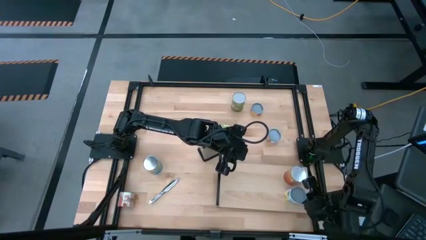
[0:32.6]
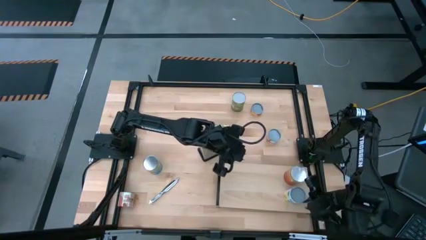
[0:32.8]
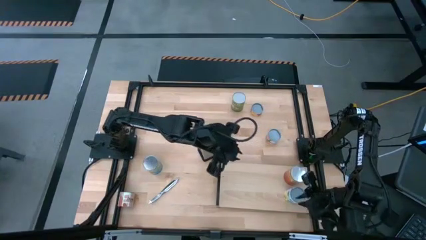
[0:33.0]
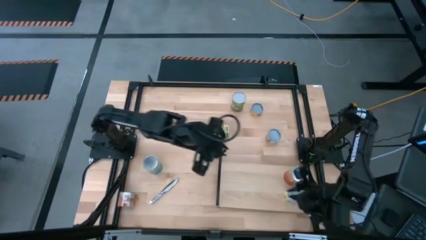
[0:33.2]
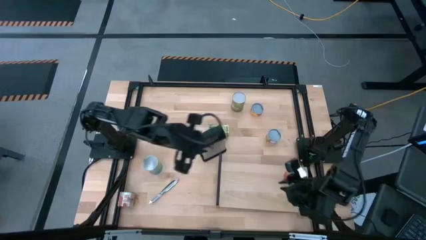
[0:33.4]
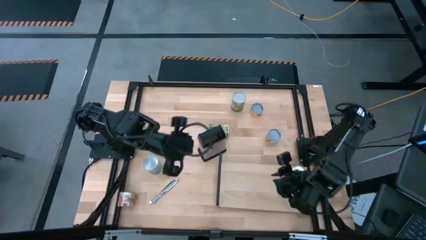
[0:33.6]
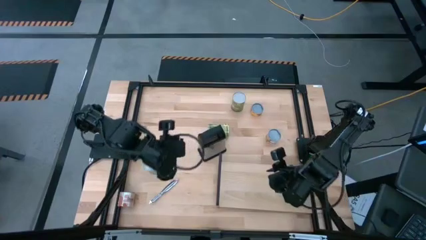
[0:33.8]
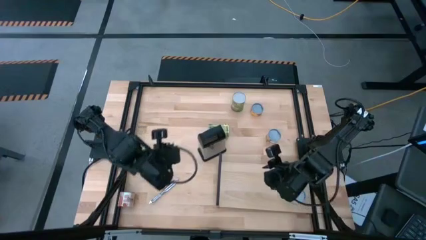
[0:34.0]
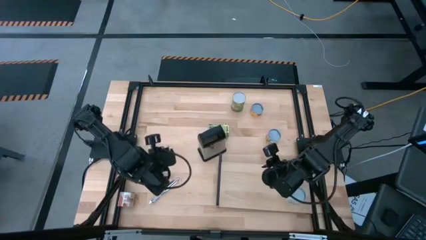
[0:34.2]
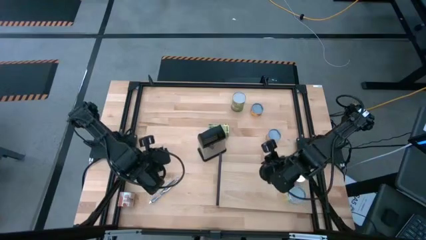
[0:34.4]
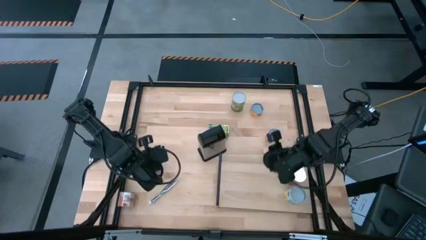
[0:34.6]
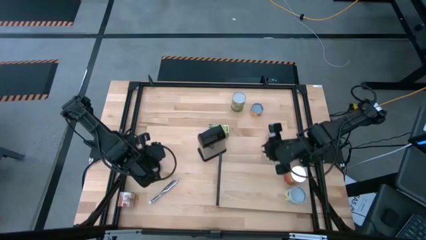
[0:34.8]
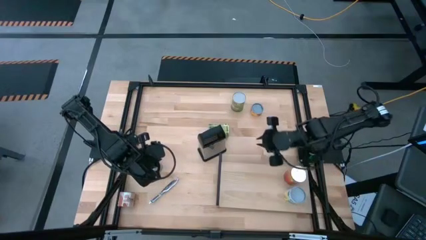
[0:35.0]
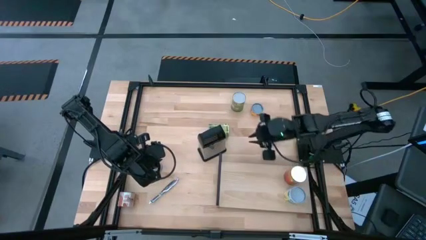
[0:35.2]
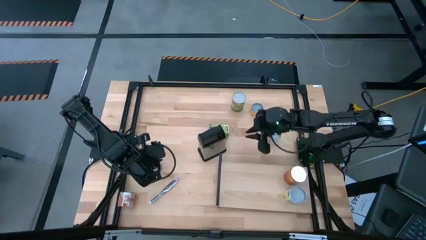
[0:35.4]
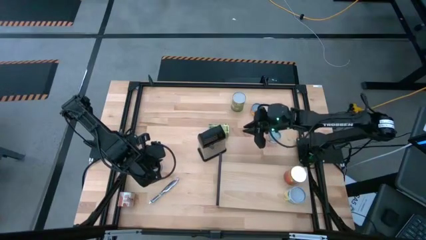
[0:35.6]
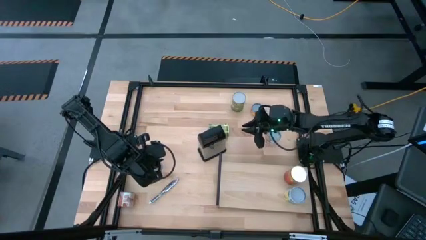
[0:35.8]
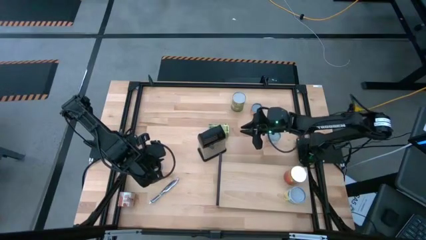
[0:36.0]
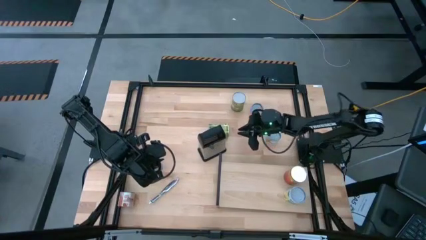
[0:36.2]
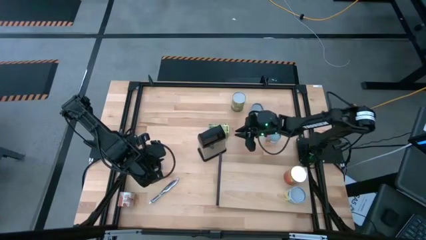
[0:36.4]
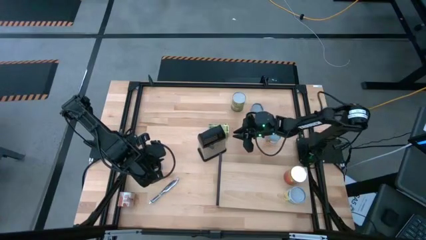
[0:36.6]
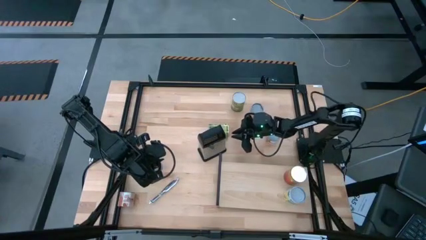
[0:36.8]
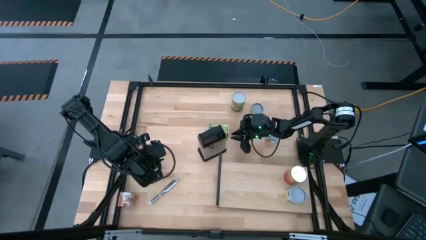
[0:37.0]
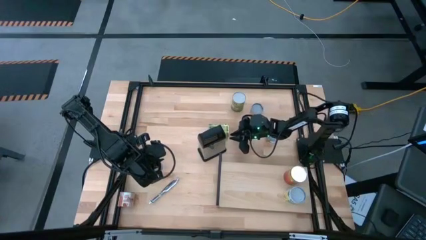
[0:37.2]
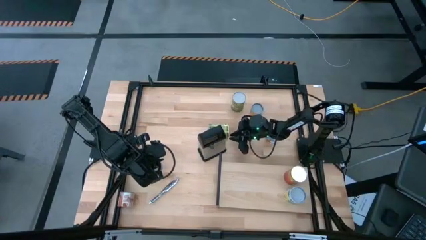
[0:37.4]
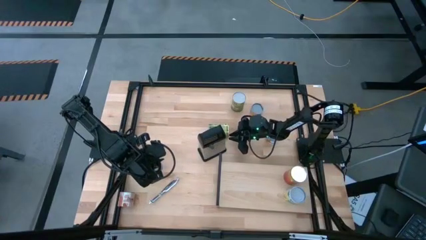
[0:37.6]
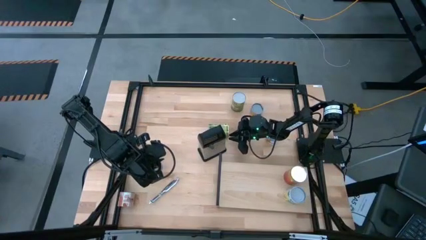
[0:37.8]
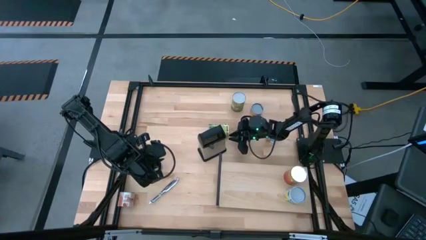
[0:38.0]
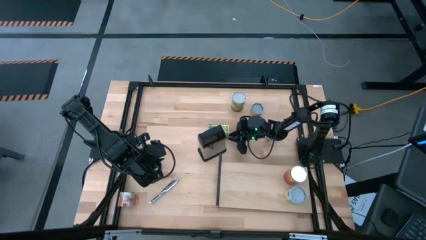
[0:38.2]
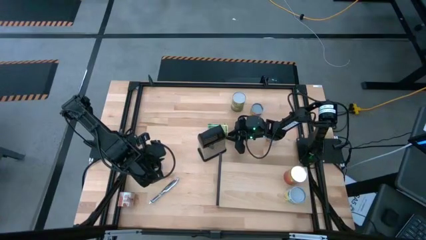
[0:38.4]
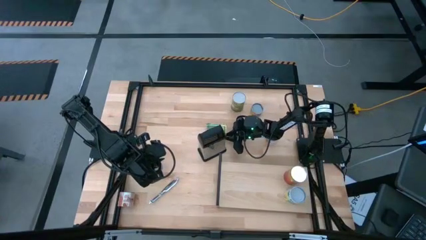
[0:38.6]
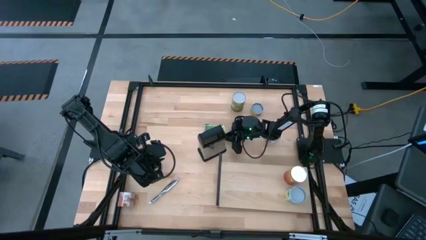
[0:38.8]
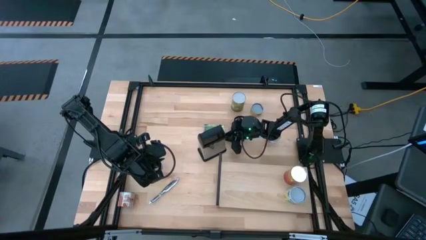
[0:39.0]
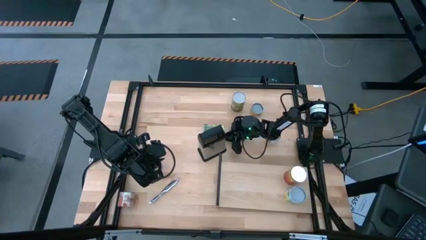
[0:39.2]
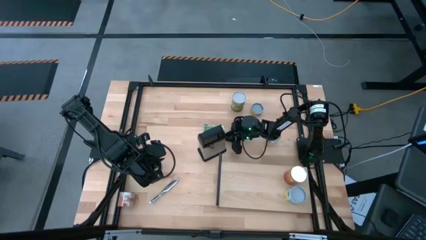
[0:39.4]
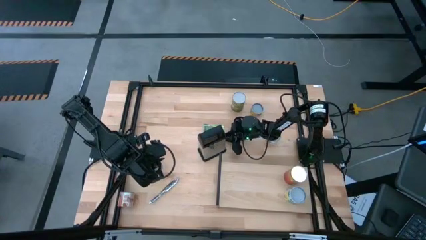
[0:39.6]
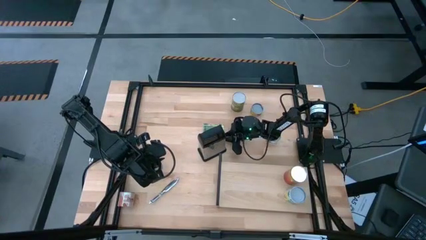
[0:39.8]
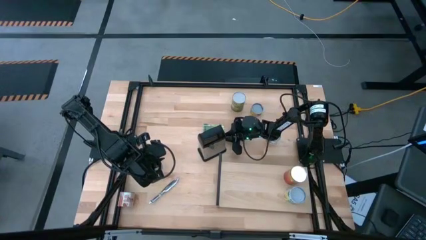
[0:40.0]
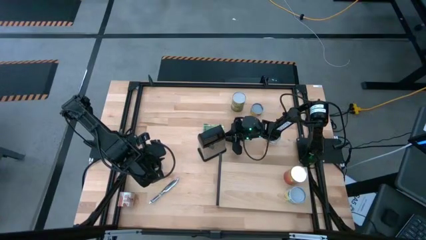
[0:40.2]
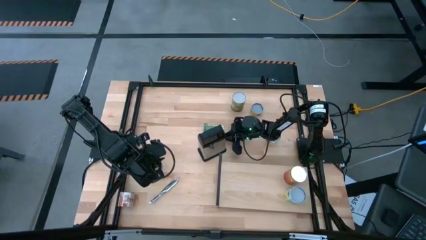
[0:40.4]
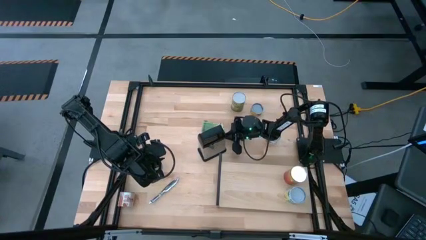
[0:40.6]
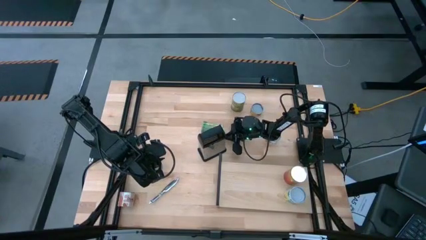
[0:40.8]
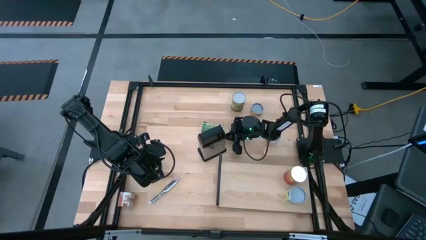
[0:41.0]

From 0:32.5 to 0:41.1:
Task: Pick and place cans onto a shelf
Put the large canned oranges on the shelf

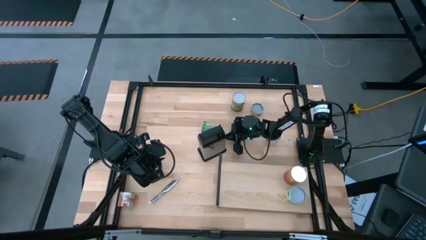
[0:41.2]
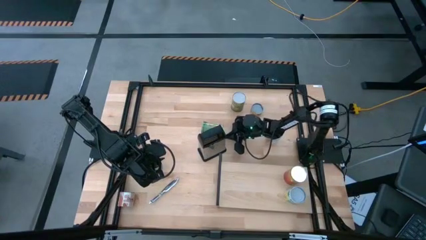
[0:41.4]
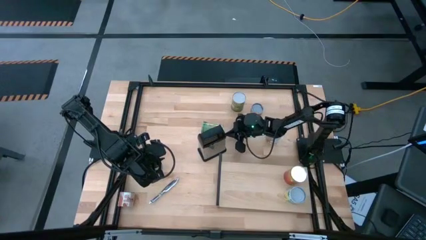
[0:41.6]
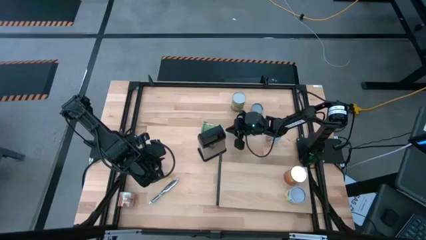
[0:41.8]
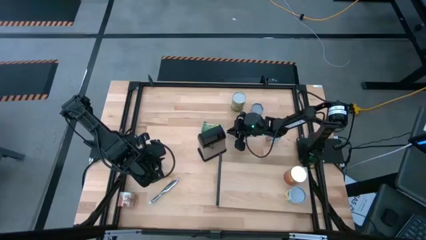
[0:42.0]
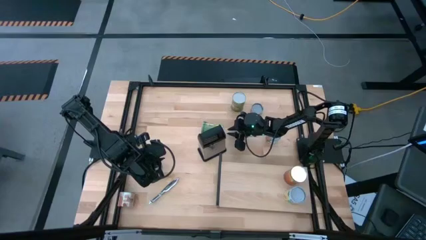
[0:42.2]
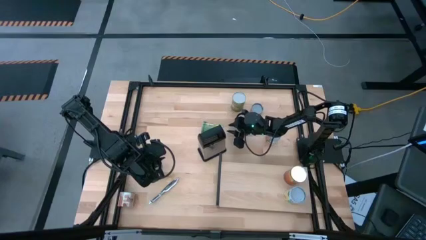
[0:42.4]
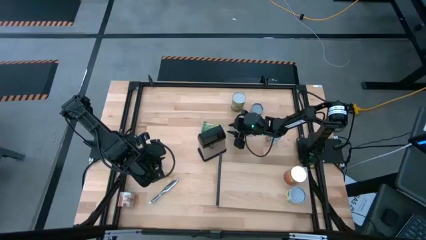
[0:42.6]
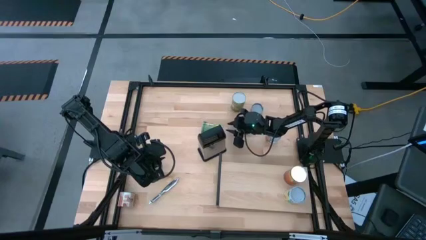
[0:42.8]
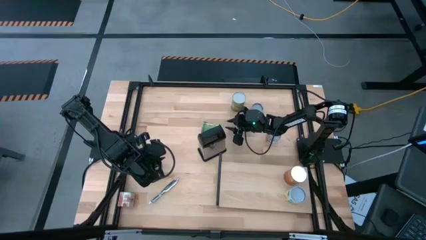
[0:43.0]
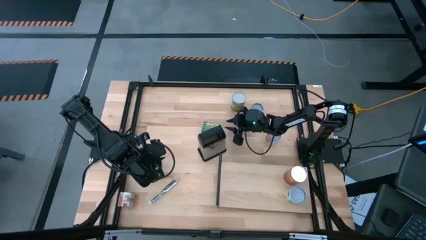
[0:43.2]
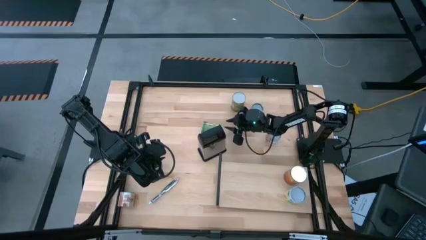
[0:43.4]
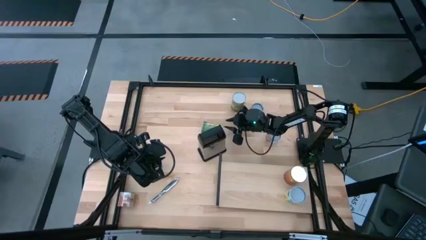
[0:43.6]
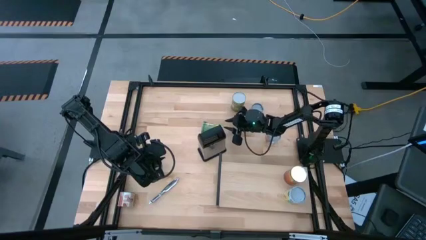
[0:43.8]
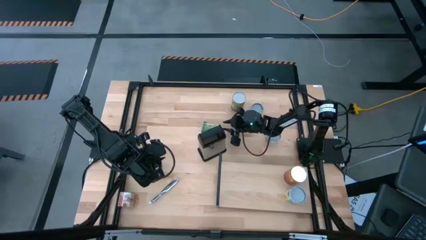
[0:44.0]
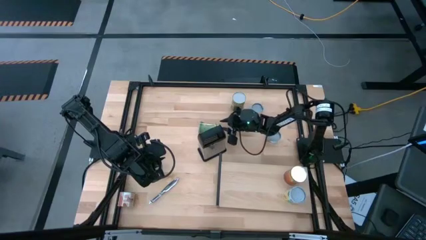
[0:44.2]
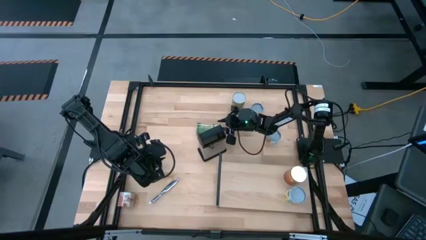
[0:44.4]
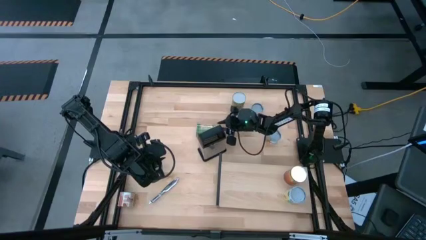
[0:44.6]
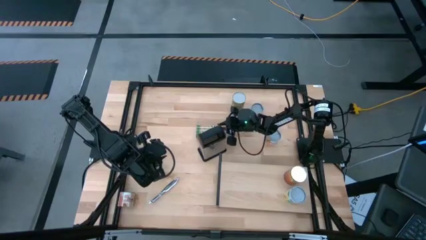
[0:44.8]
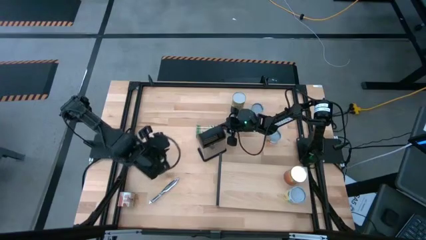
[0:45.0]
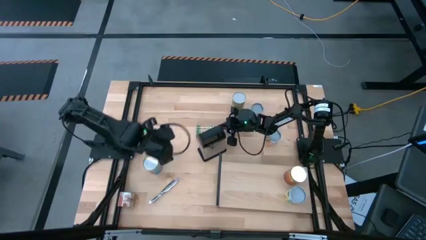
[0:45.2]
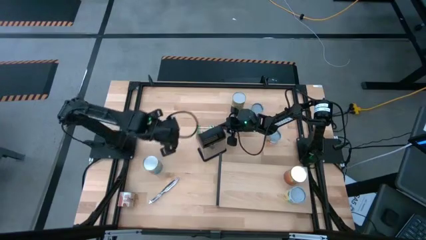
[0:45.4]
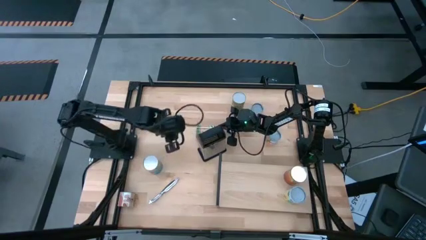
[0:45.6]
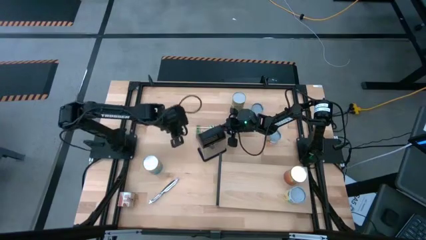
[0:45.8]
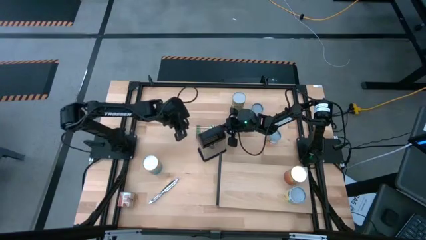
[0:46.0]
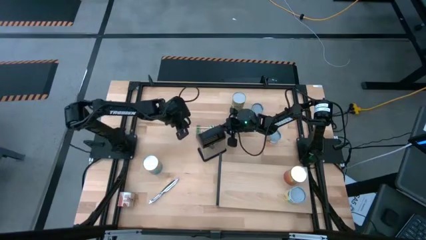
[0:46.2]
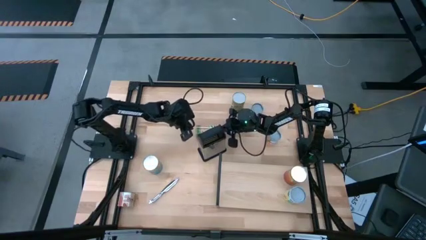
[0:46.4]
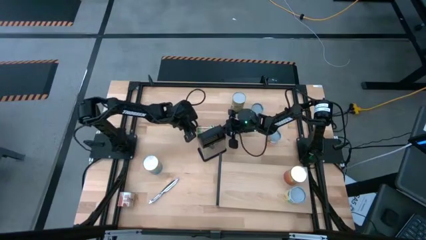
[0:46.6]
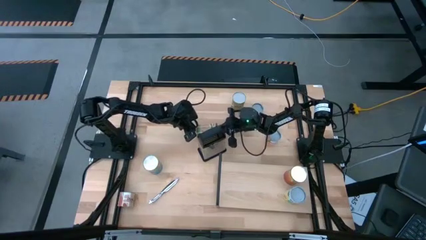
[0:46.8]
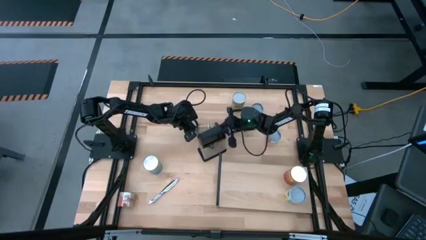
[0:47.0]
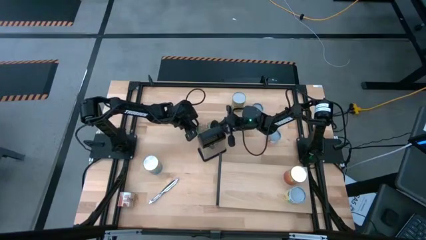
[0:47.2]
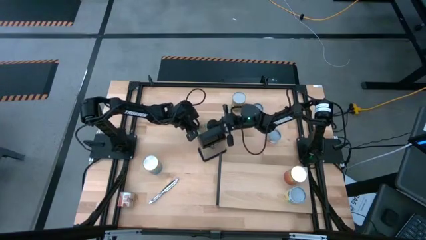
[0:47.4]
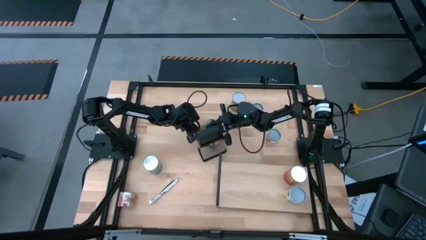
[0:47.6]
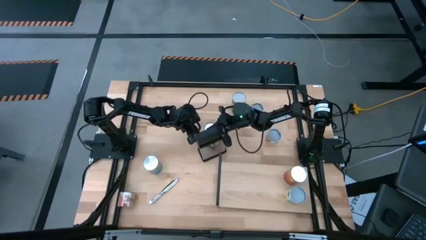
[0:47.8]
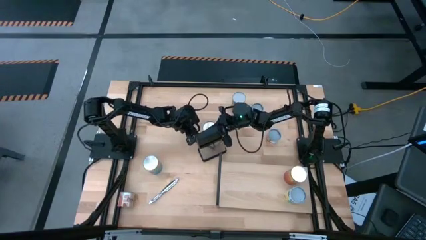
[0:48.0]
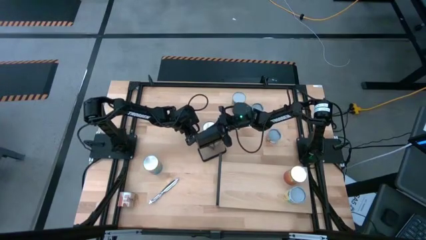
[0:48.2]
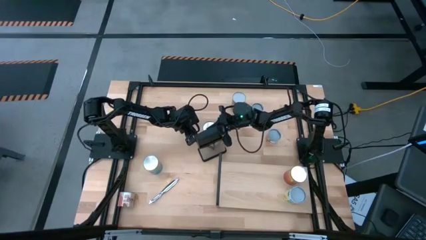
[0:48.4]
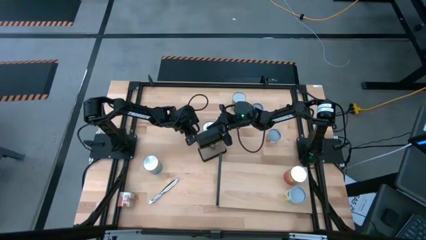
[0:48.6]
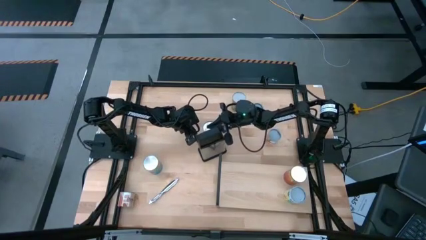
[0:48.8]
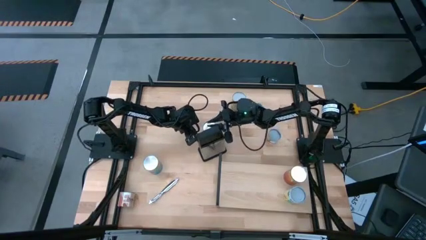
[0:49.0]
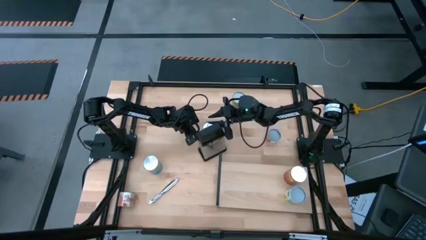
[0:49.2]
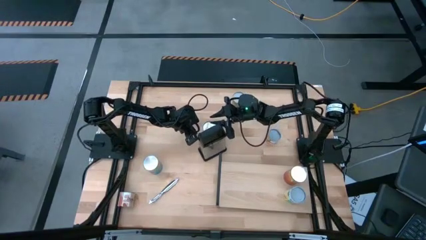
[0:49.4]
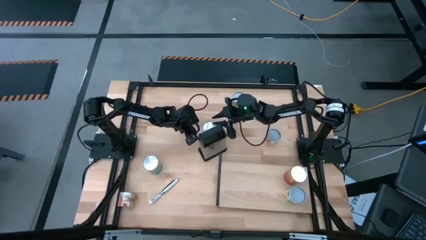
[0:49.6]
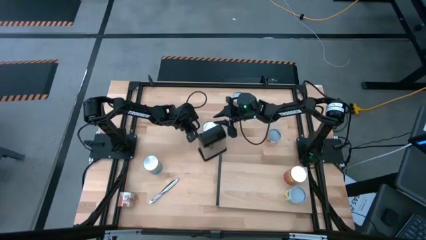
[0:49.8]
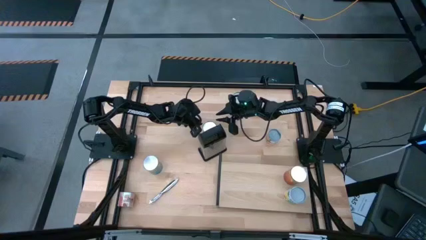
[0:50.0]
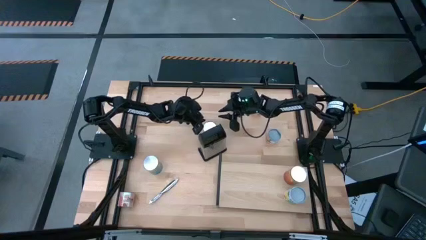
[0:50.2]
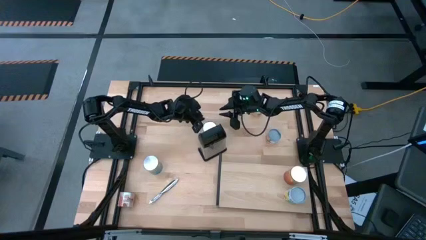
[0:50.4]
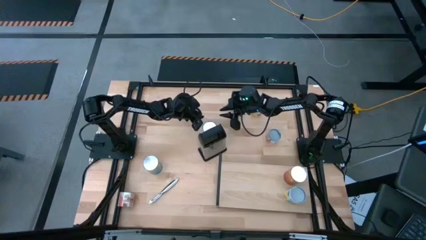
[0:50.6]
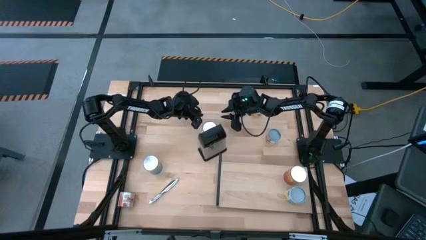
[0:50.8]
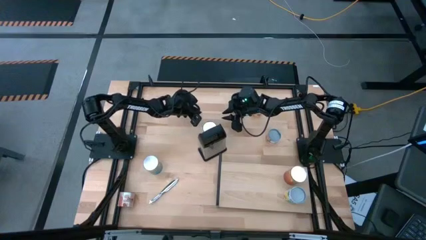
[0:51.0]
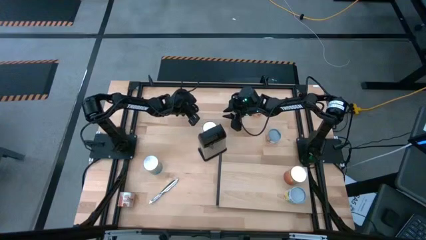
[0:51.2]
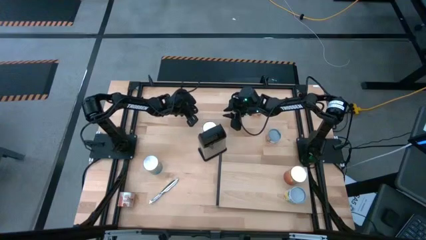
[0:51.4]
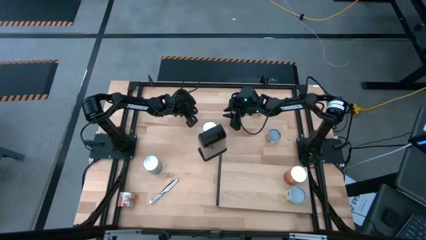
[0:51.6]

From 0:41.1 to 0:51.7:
Put the large canned oranges on the shelf
